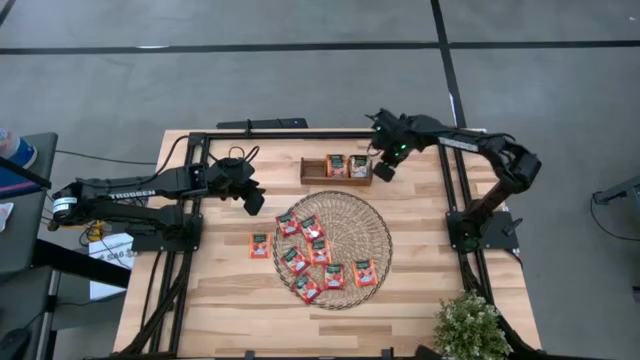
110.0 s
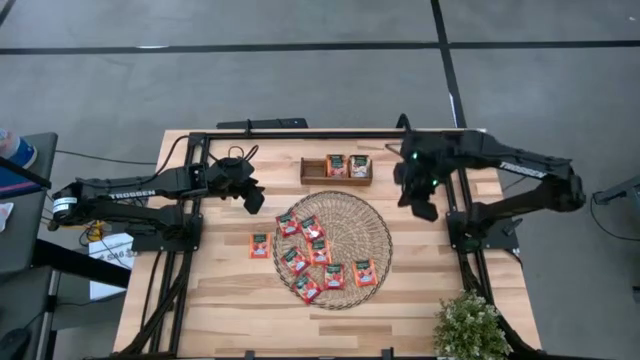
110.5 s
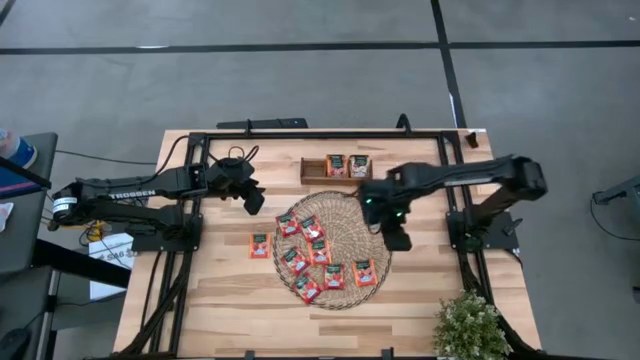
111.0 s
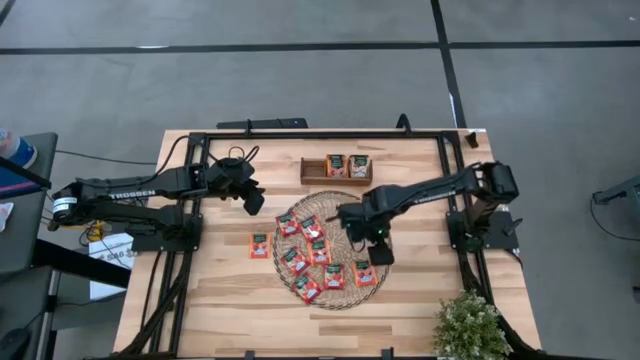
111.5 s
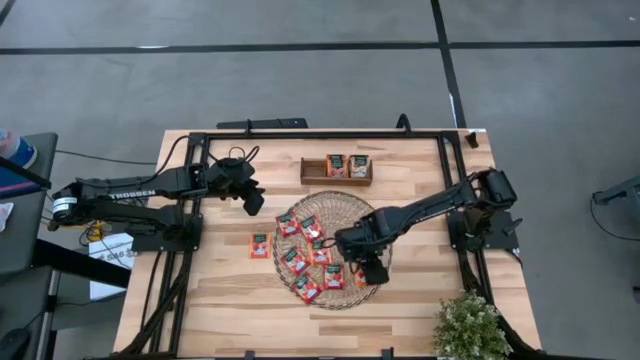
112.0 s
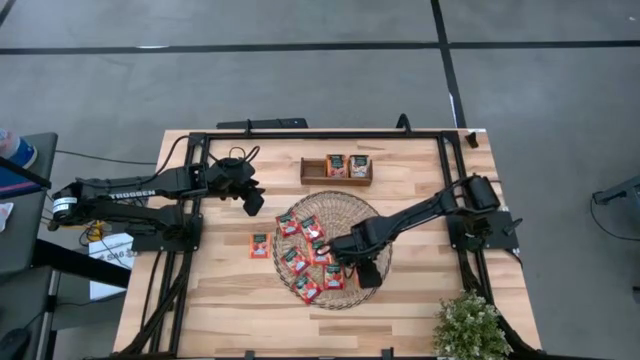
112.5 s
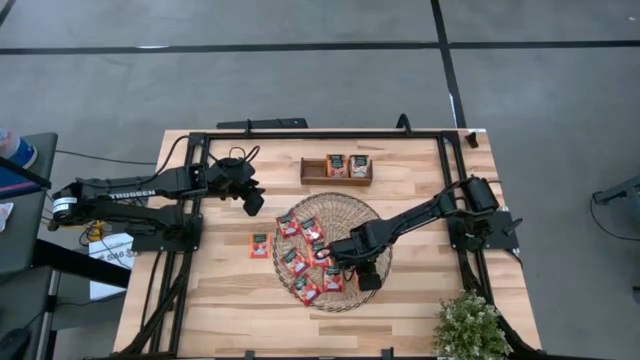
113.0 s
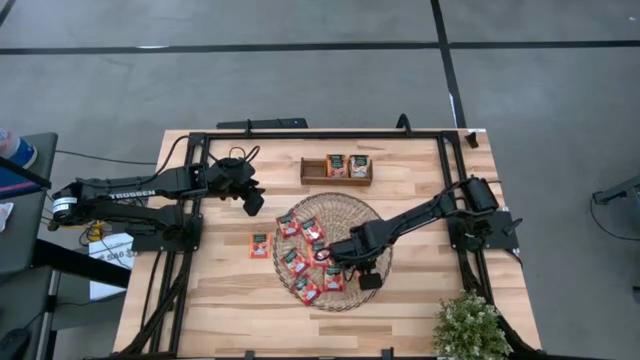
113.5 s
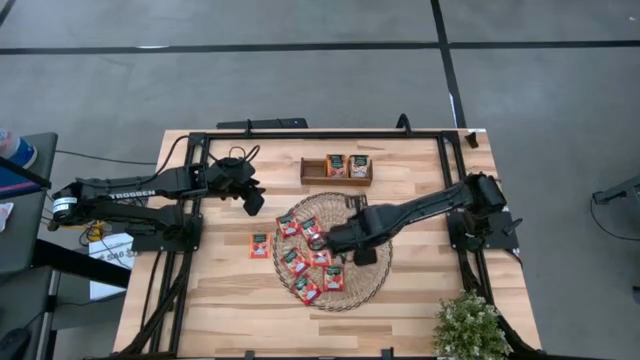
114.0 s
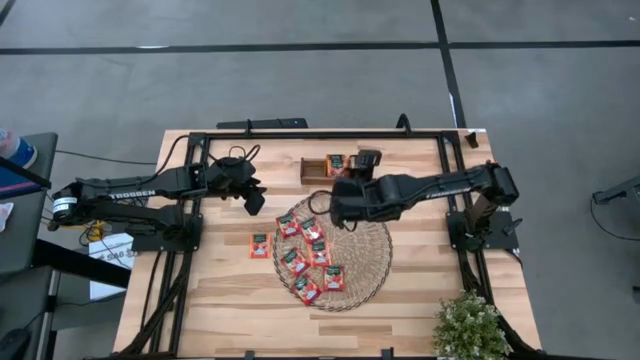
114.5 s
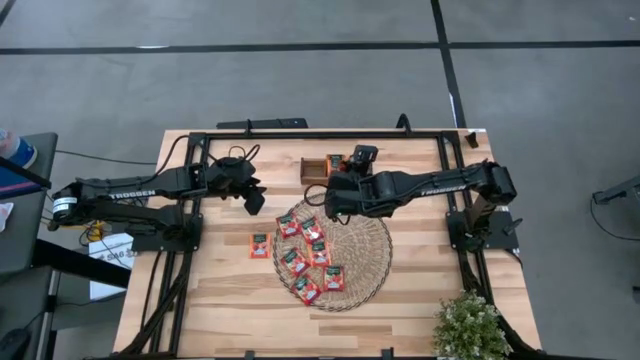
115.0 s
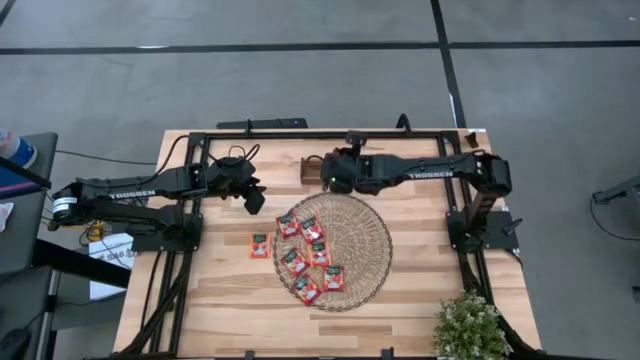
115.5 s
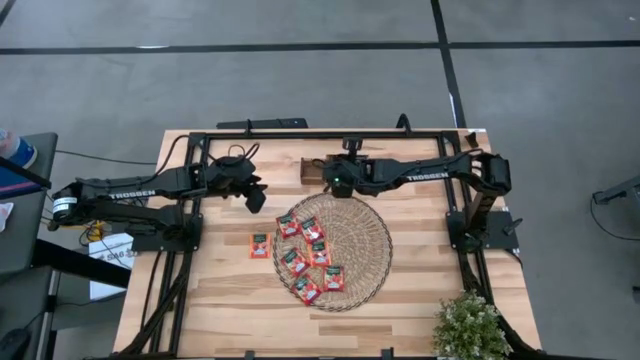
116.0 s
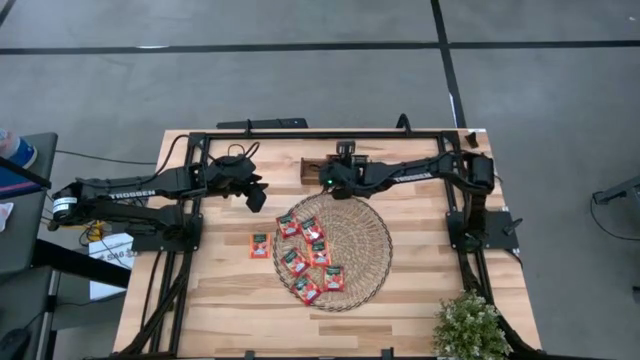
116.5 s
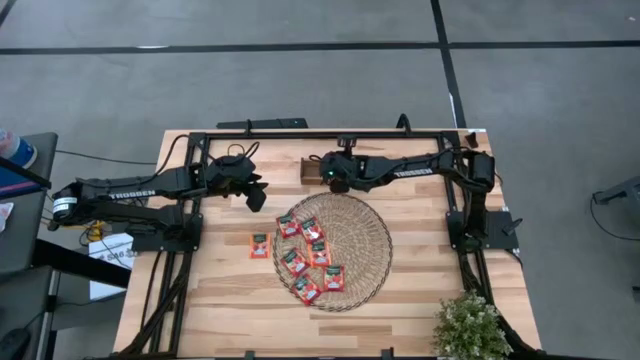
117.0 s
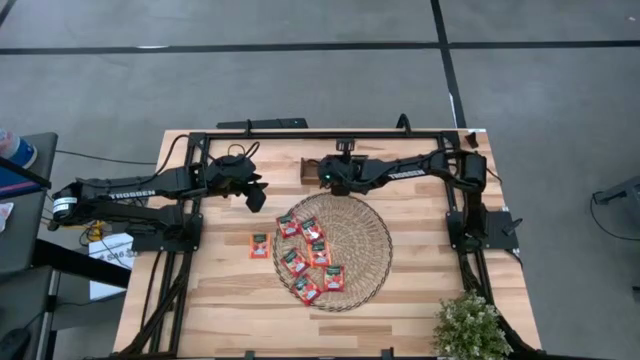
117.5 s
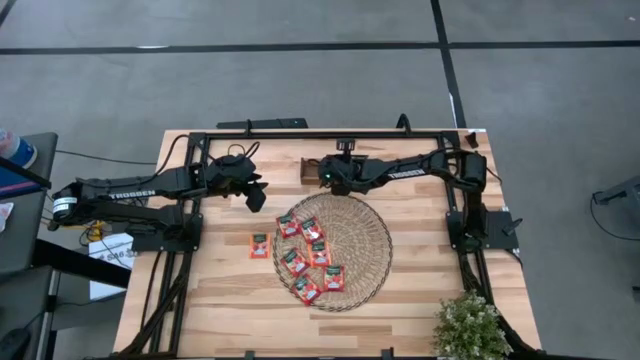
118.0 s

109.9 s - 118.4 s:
Task: Pick & Place Tea
Put the right orange tea bag into the middle slot of the wooden organizer

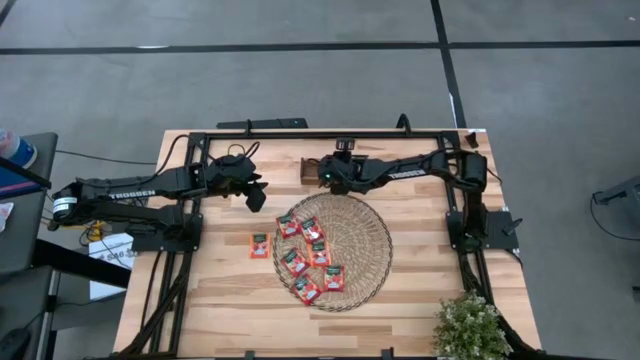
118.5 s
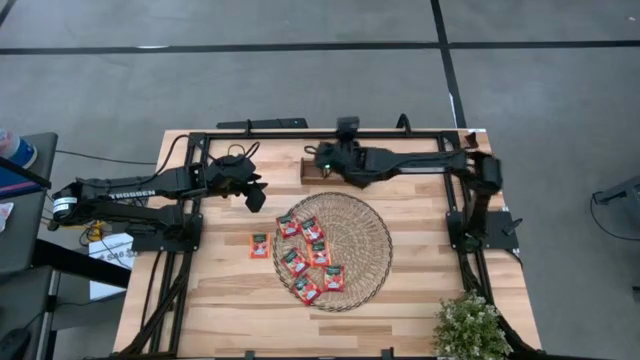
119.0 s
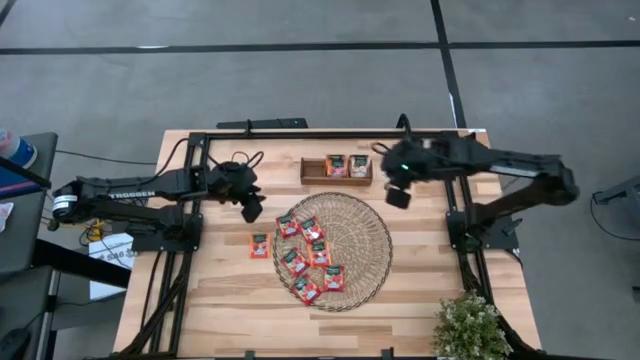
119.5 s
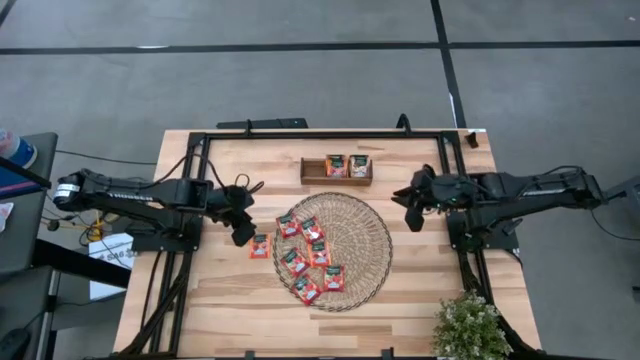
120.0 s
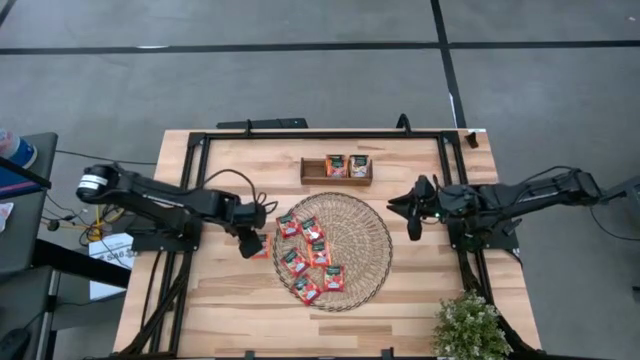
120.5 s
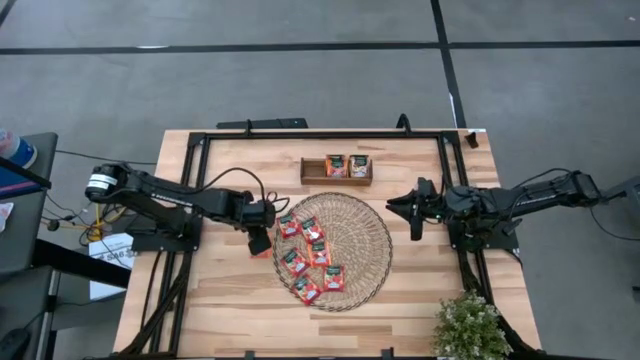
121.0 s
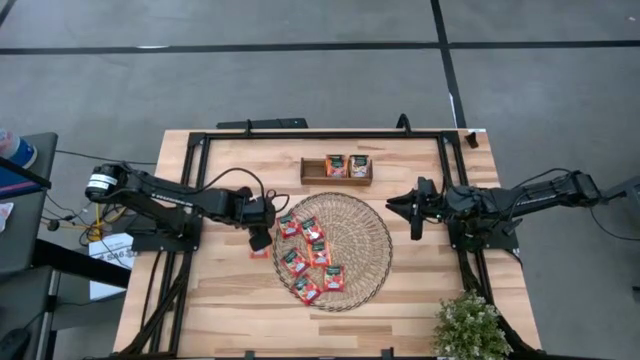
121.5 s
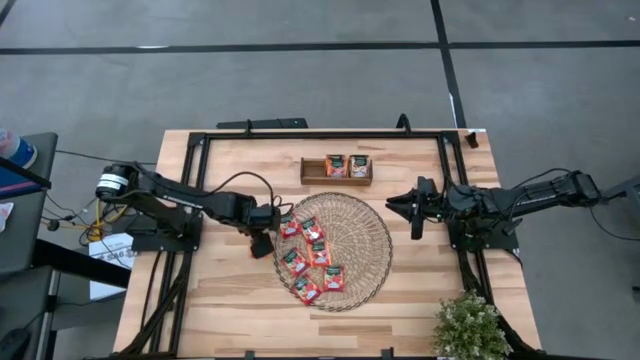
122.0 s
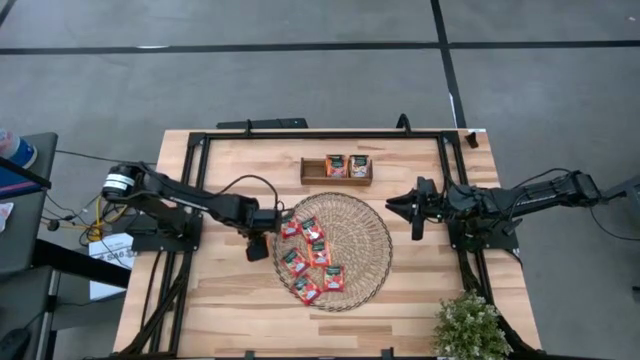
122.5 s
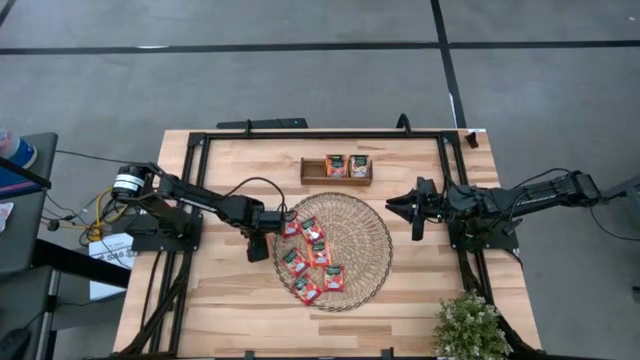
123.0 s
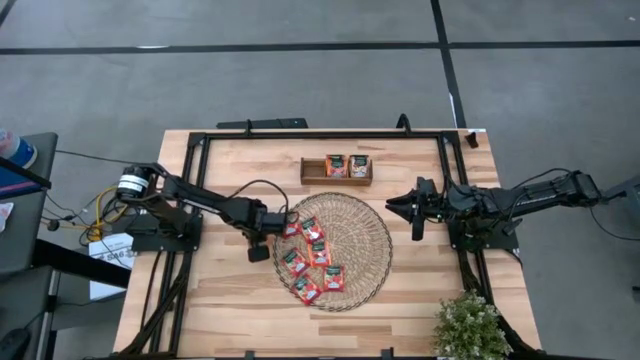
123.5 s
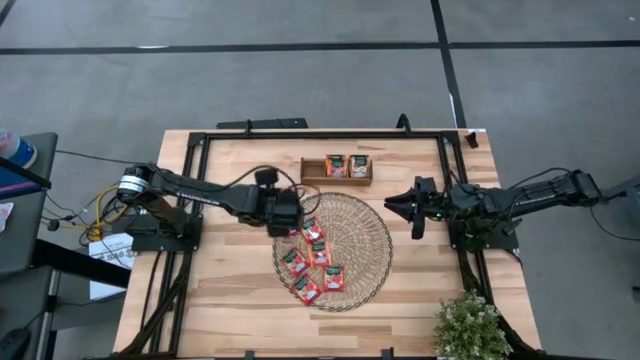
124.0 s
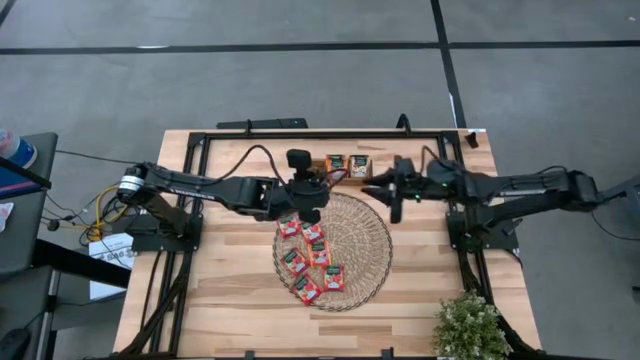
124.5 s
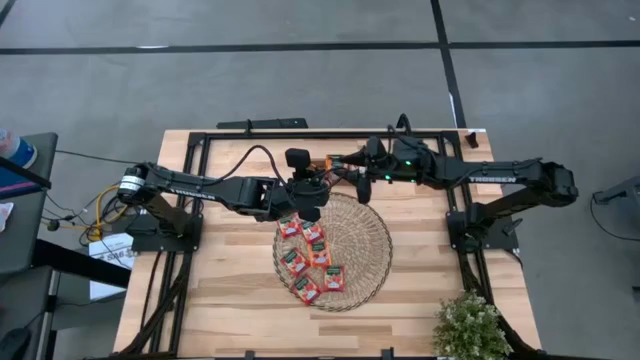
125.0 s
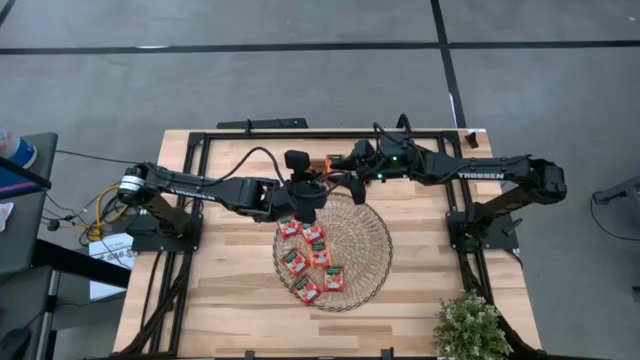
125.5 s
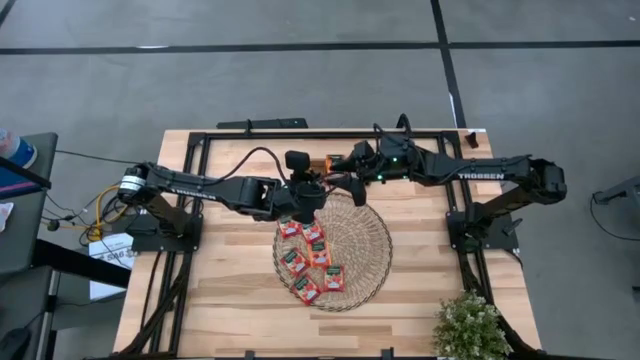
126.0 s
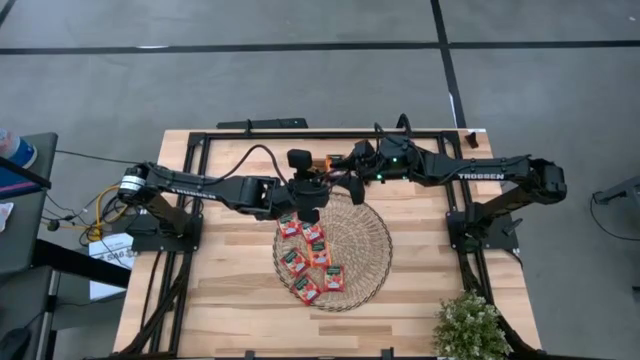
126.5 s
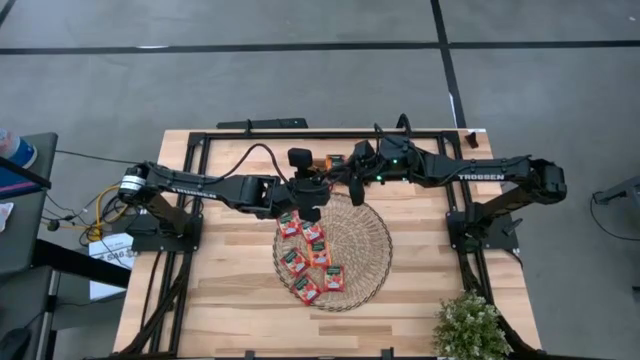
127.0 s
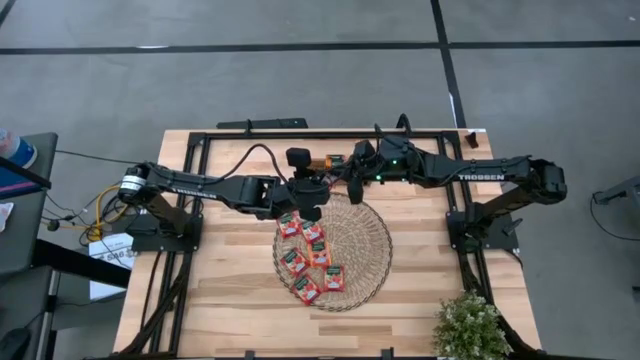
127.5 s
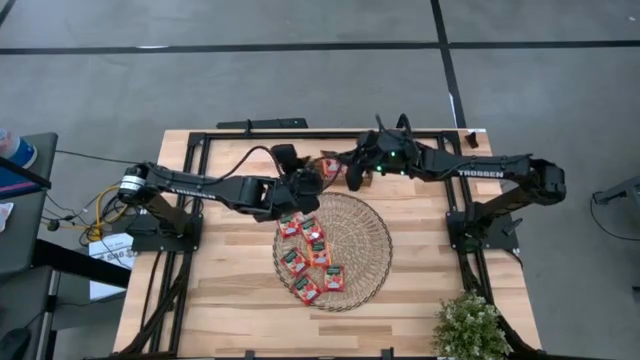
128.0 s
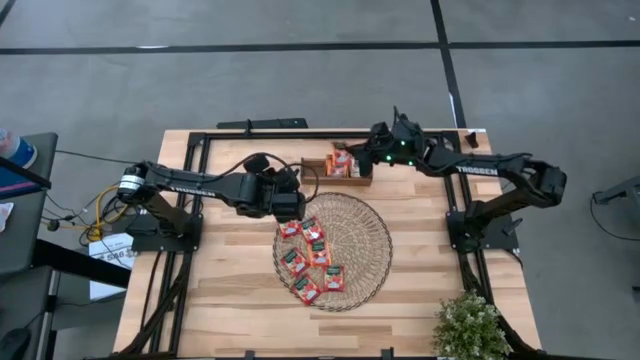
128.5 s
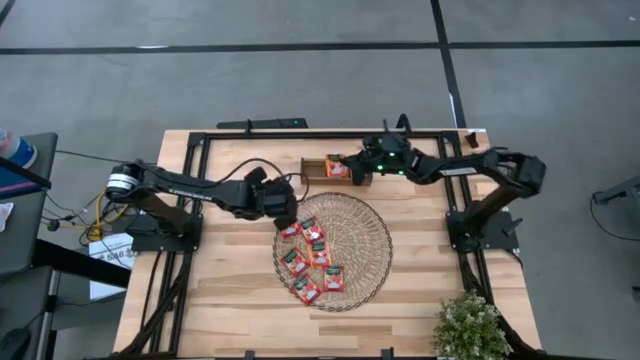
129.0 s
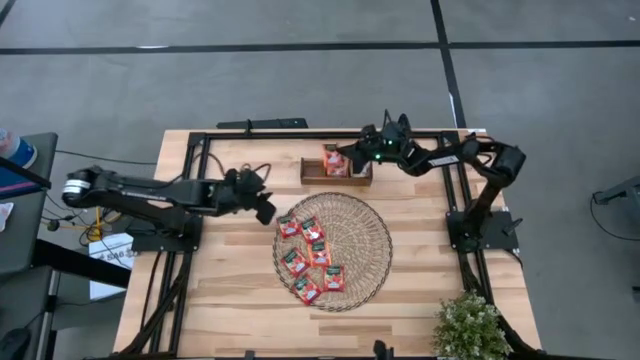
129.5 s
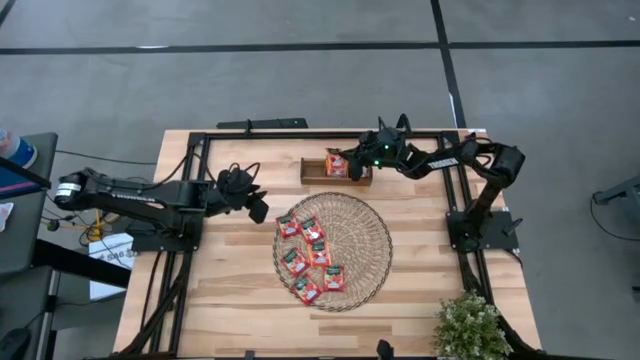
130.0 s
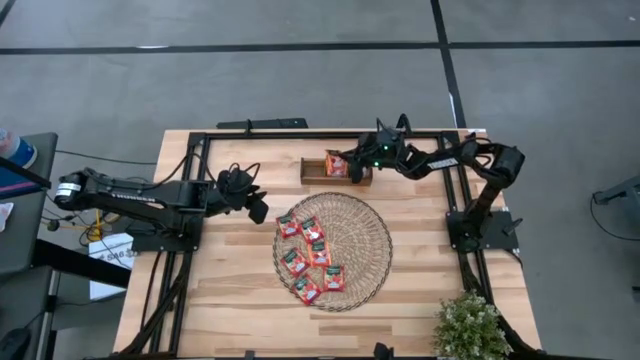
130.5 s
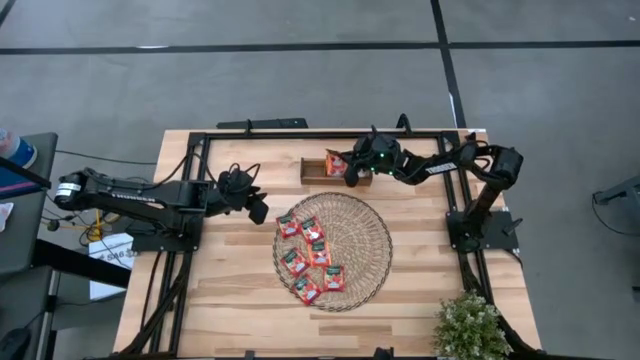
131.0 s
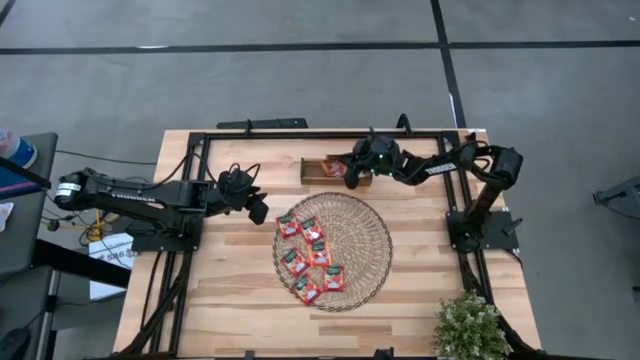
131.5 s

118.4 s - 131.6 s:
Put the left orange tea bag into the middle slot of the wooden organizer
